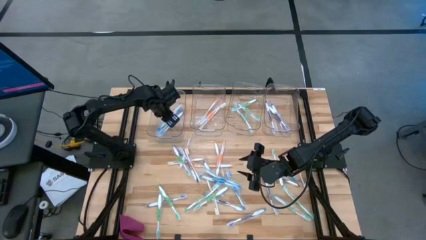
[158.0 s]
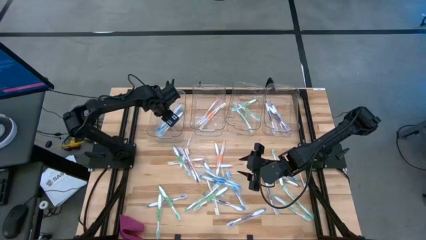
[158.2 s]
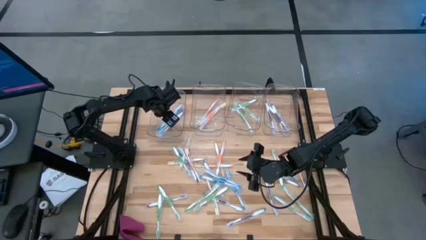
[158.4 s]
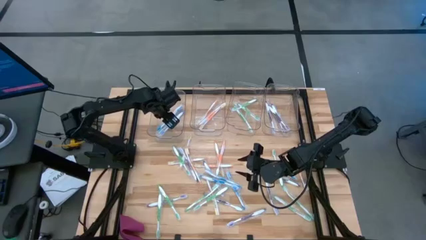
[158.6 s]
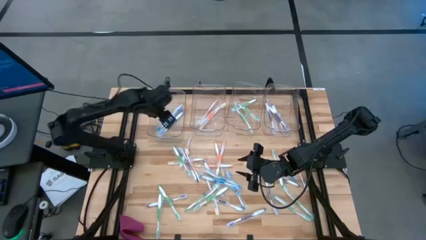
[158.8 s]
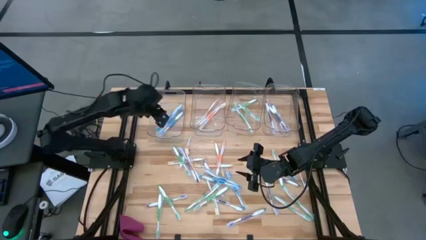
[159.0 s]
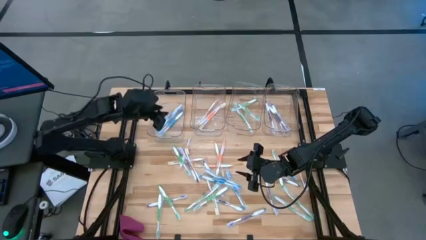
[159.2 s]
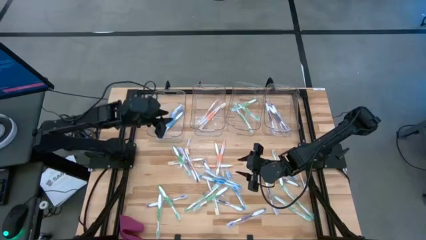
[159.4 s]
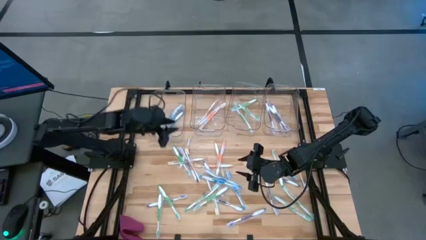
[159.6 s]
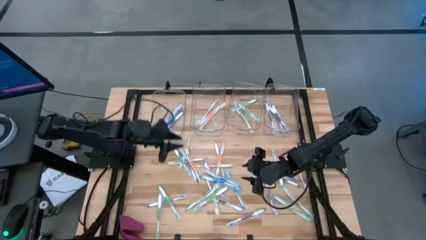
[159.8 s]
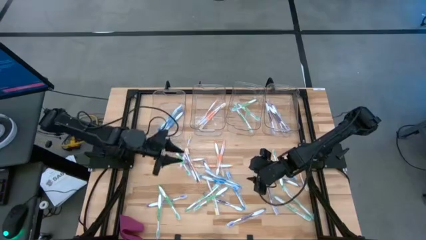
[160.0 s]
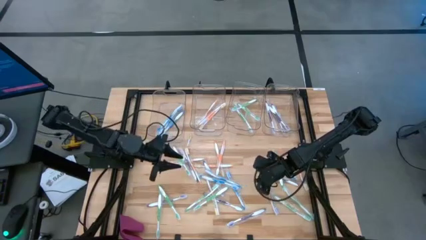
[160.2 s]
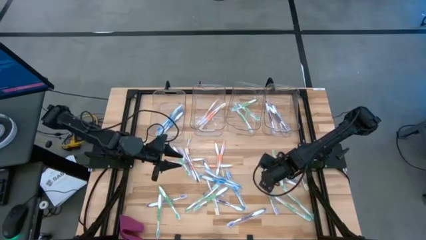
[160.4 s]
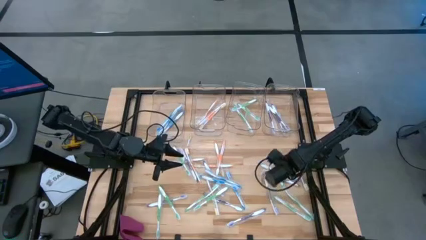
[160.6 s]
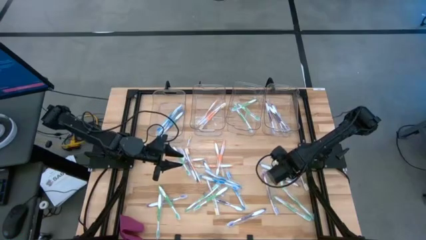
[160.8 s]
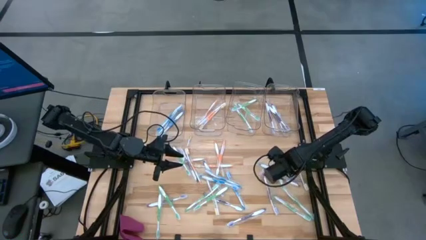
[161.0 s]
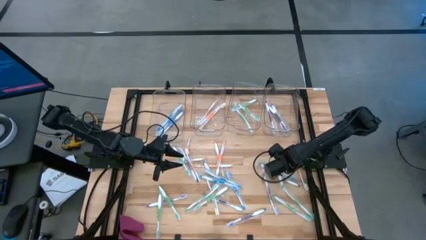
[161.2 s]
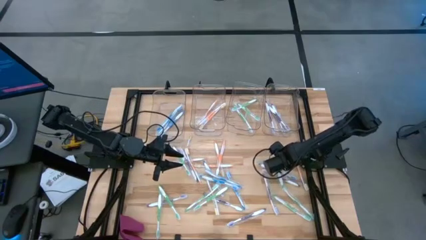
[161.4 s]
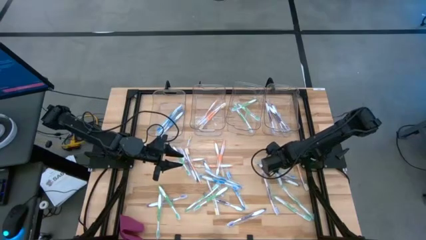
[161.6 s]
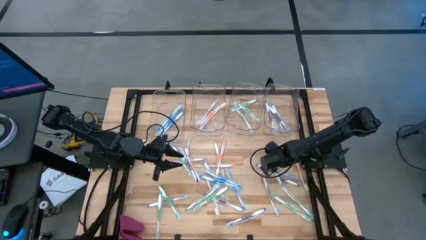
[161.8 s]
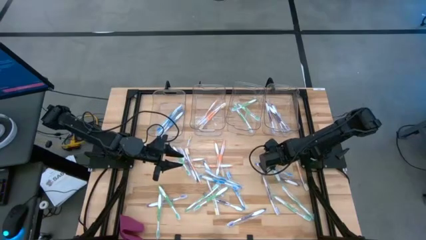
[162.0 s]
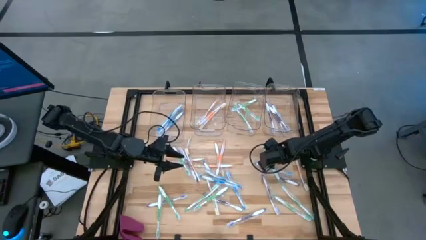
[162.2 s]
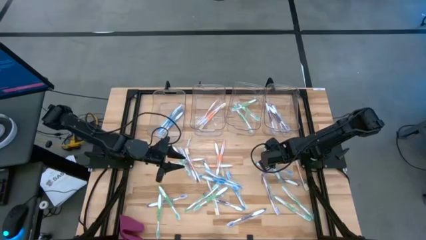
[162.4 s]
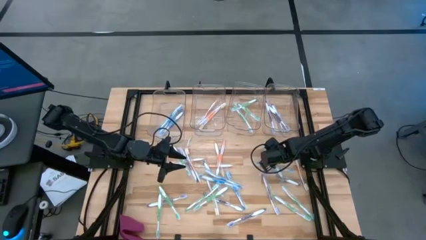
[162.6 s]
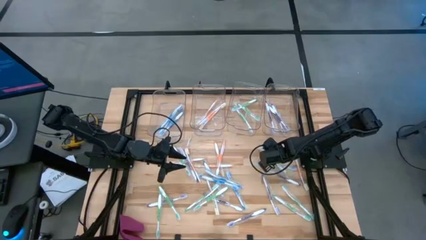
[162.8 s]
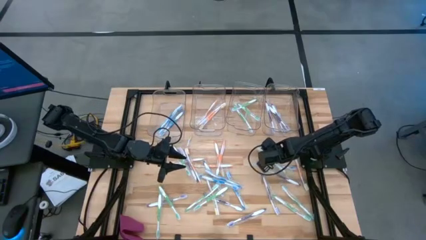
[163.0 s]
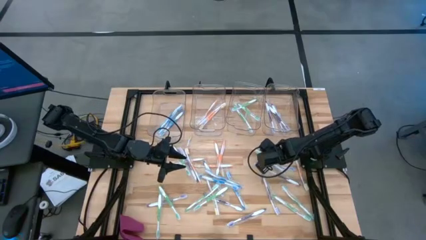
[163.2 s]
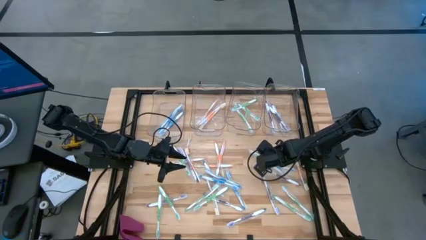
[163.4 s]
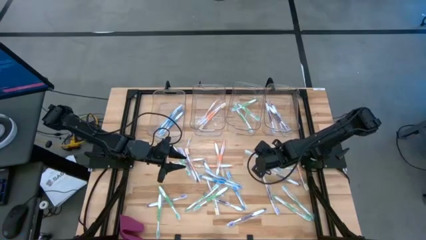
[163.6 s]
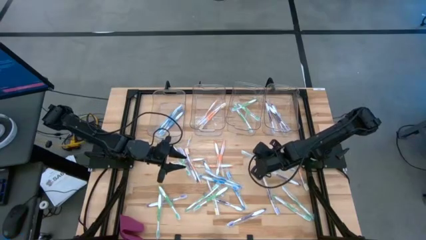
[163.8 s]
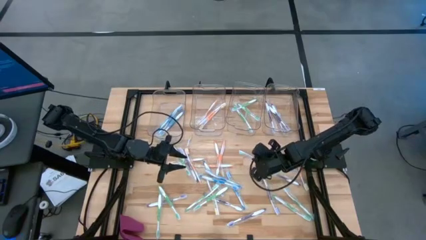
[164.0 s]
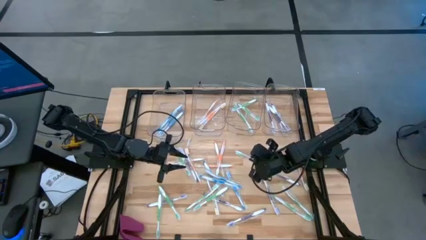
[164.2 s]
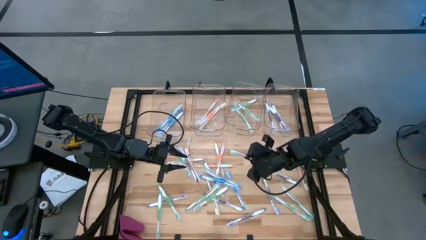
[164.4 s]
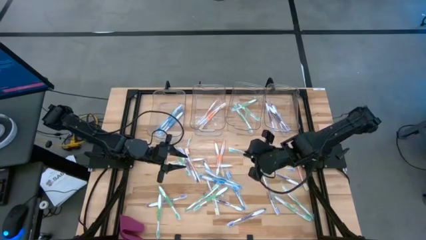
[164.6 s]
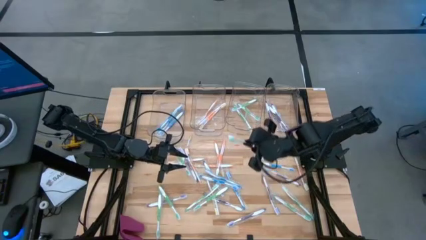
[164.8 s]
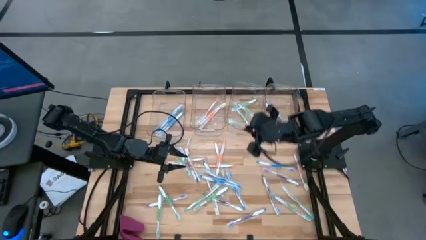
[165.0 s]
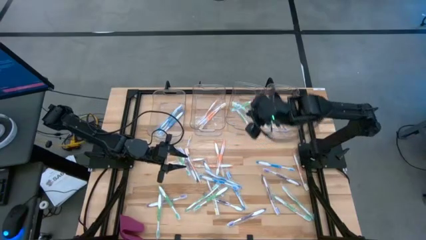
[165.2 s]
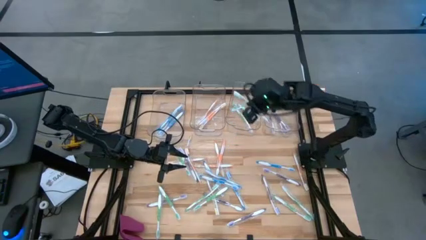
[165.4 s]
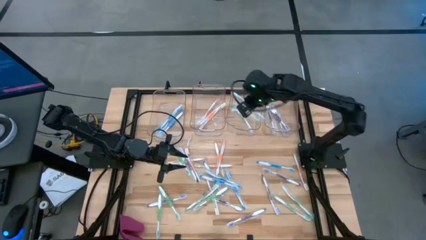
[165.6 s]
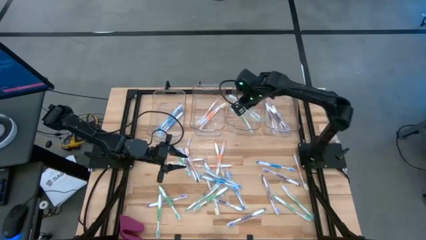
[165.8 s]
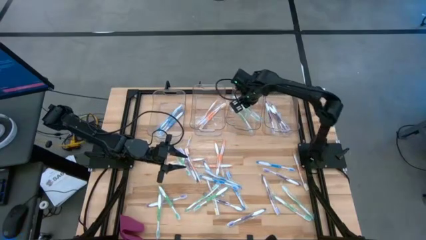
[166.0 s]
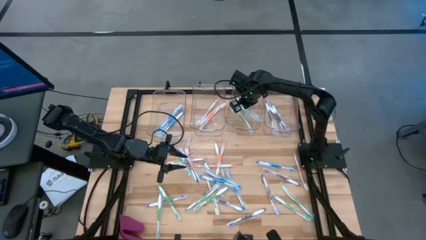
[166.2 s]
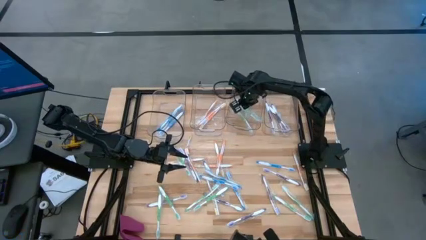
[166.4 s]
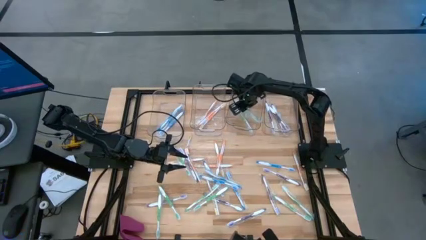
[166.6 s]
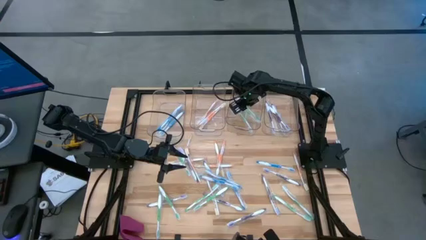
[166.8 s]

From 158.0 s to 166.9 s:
Task: Pick & Place Toothbrushes
Put the green toothbrush into the middle right transparent bin

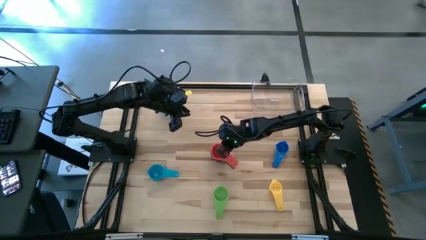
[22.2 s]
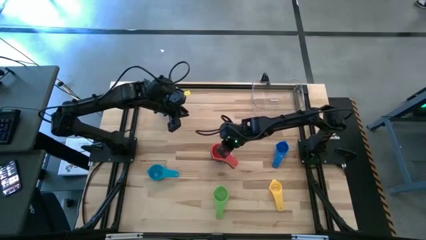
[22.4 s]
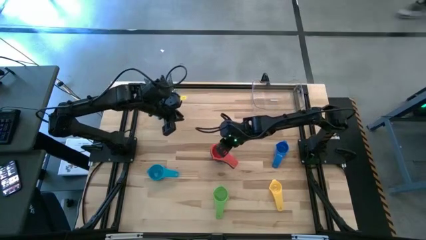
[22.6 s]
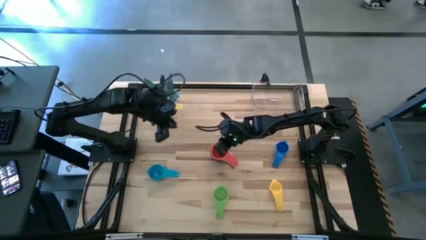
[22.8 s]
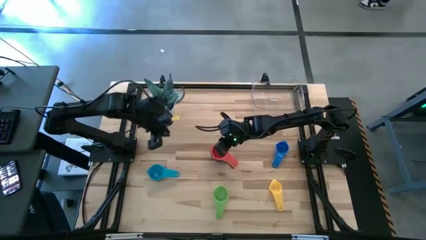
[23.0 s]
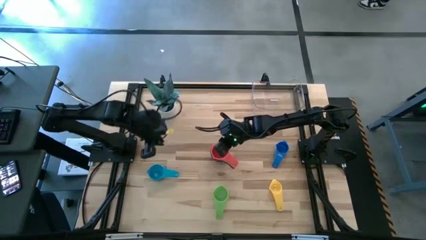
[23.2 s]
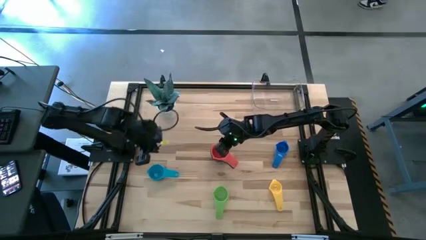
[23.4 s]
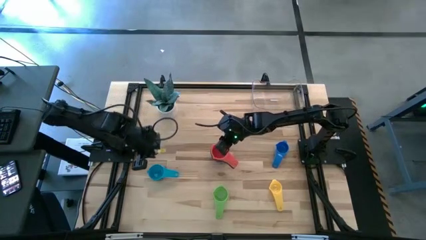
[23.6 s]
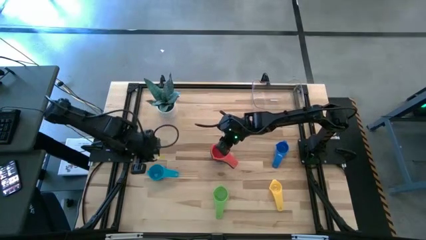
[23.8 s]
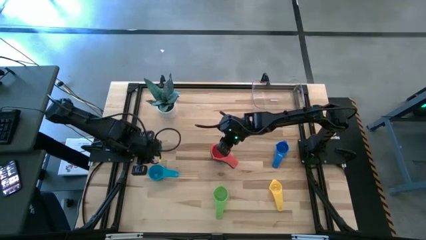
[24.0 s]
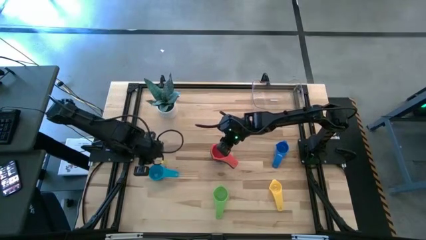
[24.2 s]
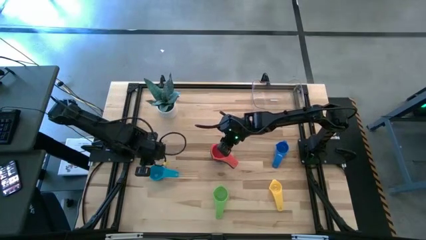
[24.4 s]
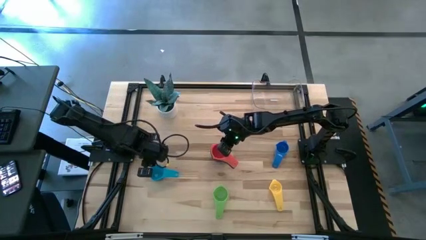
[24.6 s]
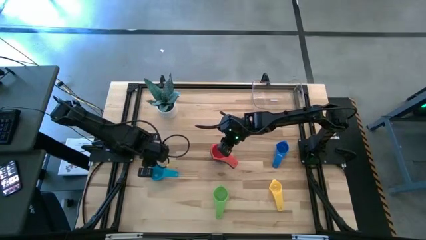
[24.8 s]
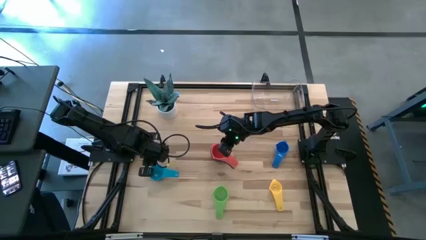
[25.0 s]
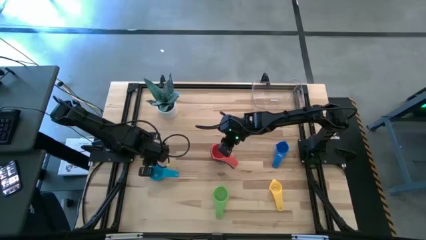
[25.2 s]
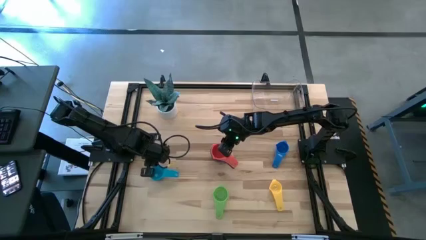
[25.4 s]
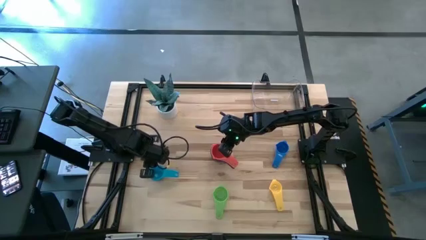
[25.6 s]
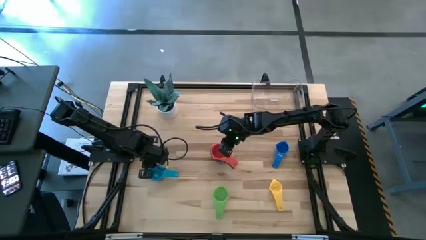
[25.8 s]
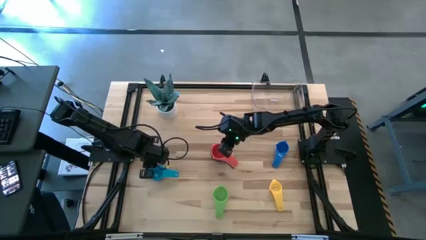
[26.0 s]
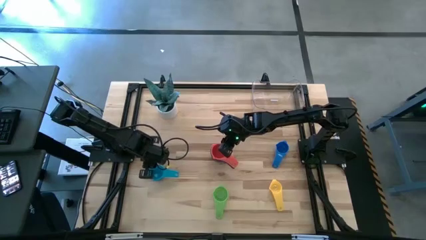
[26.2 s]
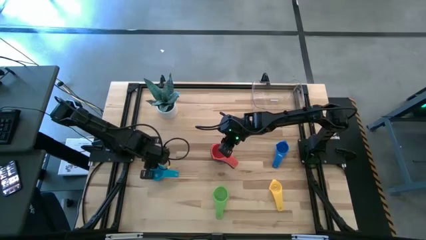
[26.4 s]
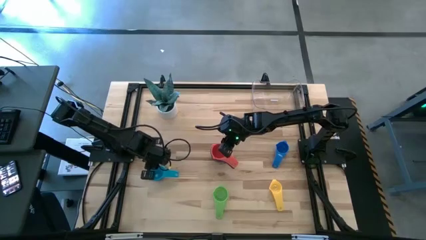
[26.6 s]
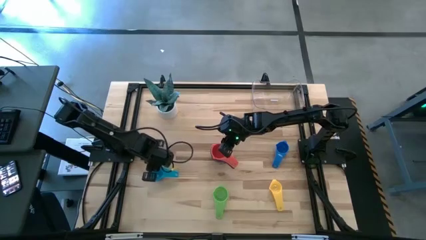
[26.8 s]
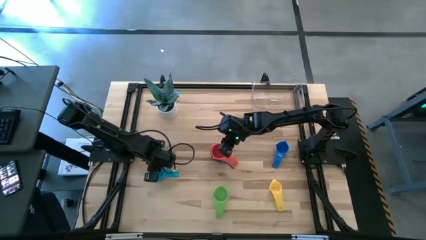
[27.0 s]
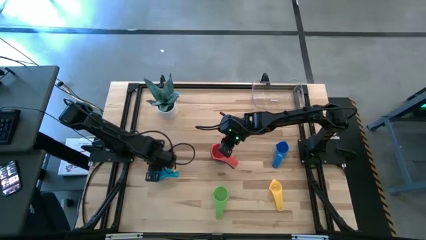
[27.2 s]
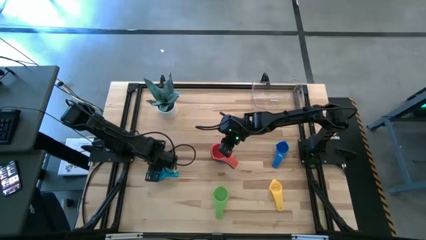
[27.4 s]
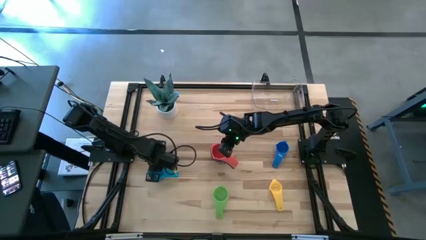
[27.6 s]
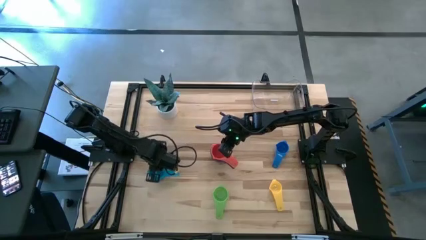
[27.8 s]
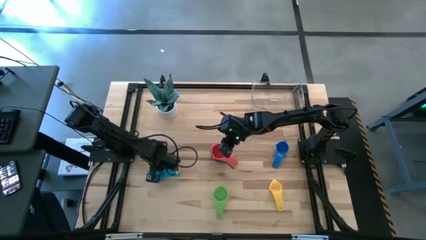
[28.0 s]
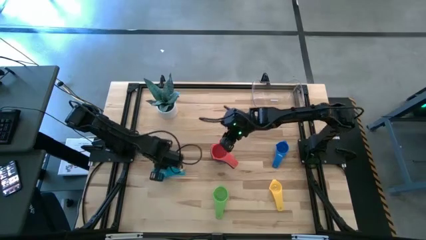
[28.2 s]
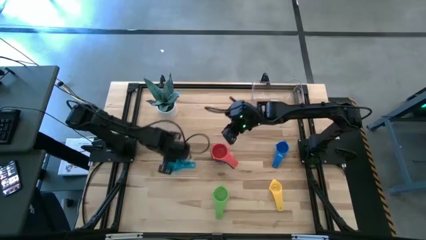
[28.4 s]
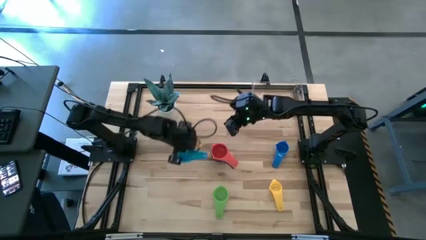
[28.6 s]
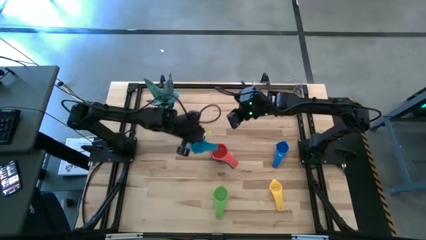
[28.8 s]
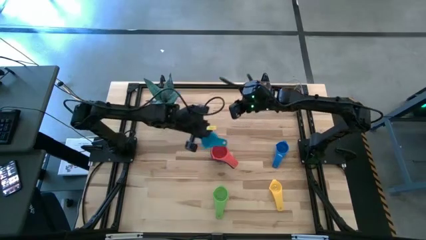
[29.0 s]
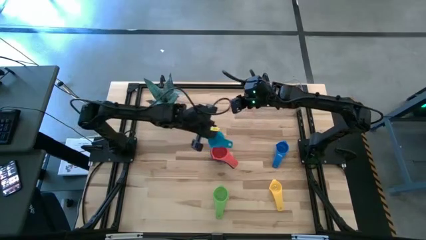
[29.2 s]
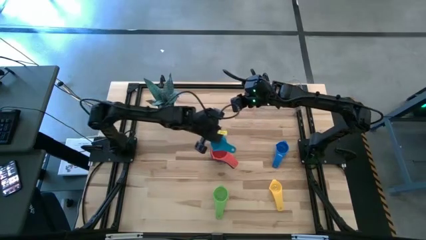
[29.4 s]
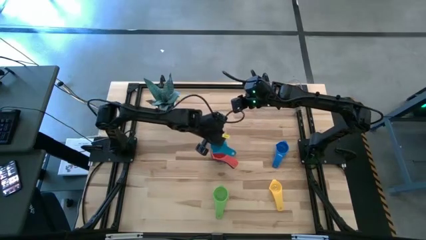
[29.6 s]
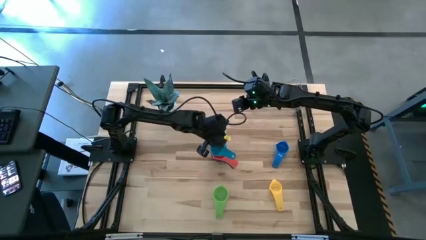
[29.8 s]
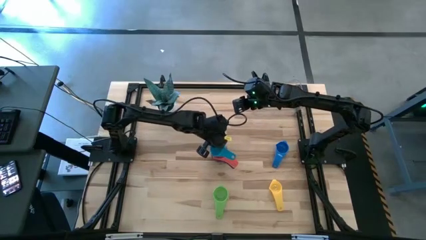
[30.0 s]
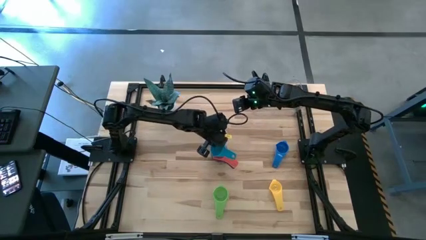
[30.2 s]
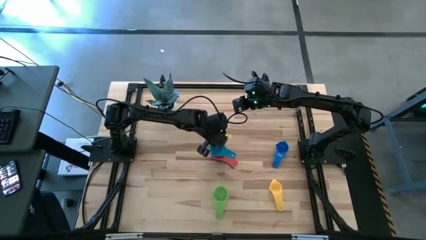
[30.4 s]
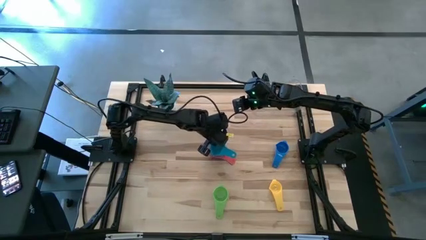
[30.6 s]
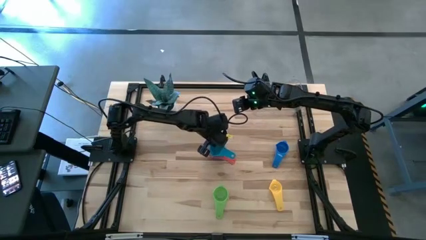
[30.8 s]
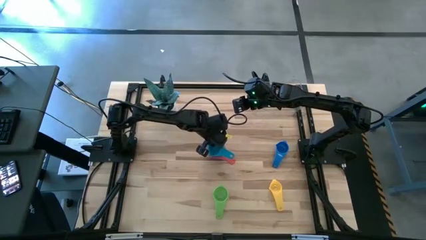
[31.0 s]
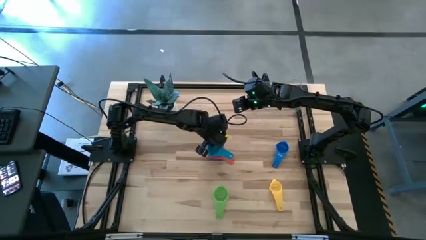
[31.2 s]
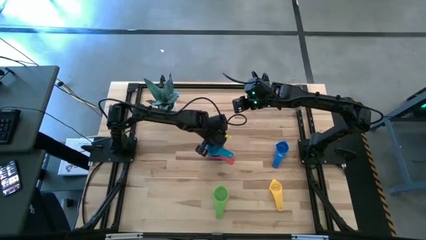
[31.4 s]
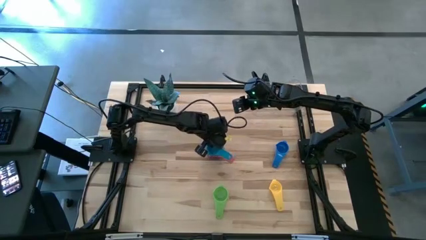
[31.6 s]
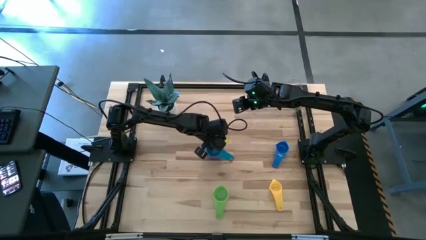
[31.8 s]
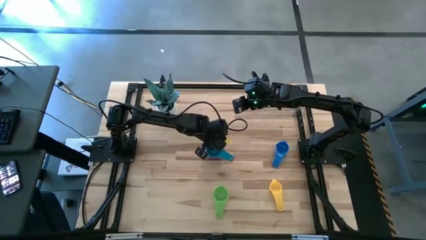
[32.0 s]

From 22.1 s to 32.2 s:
Task: Nest measuring cups in basket
Stack the light blue measuring cup on top of the red measuring cup
